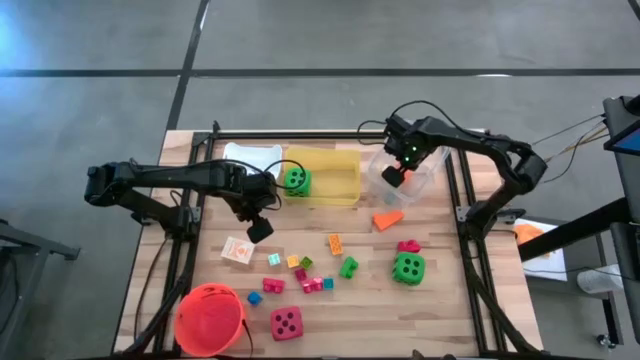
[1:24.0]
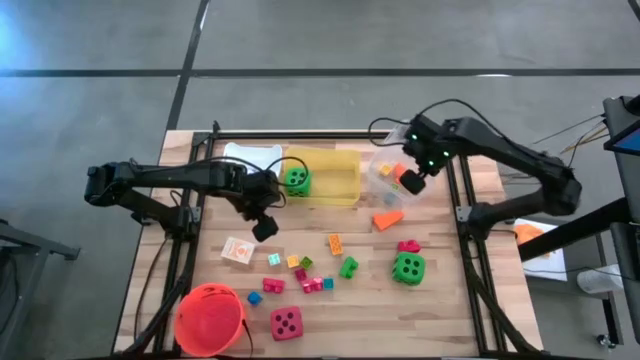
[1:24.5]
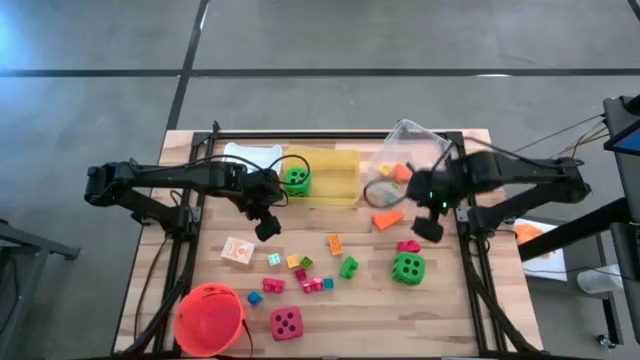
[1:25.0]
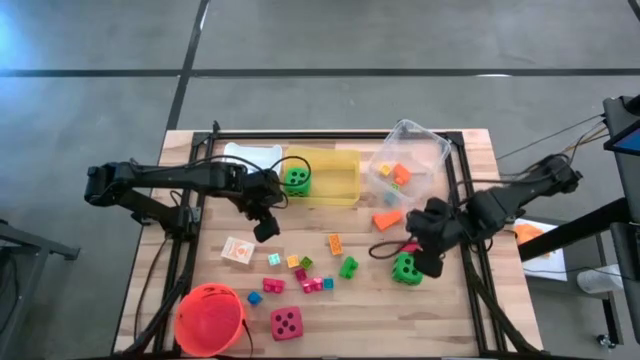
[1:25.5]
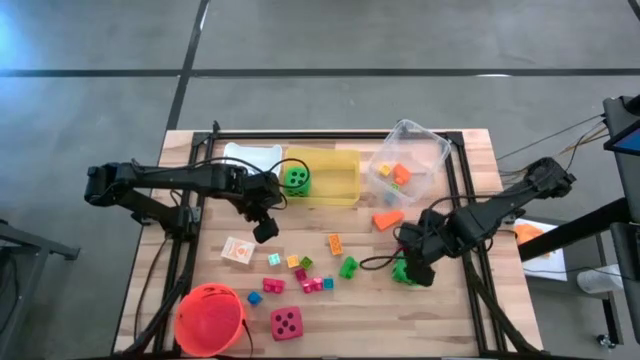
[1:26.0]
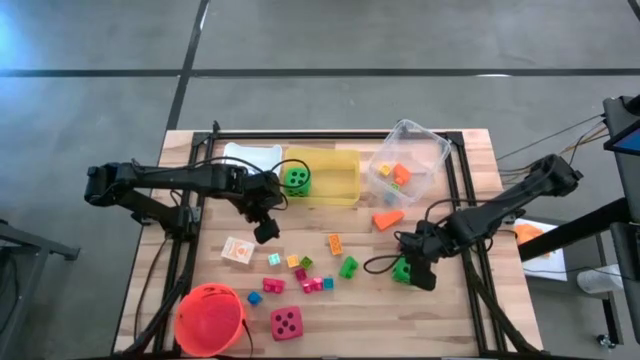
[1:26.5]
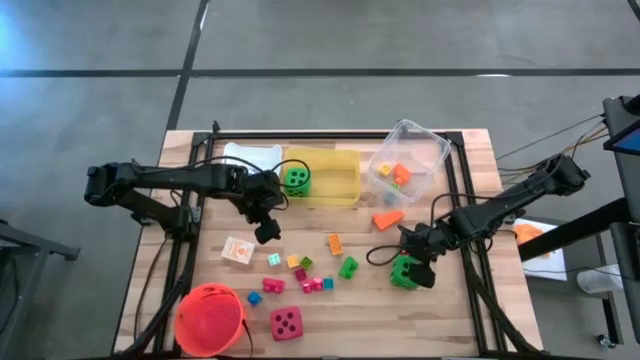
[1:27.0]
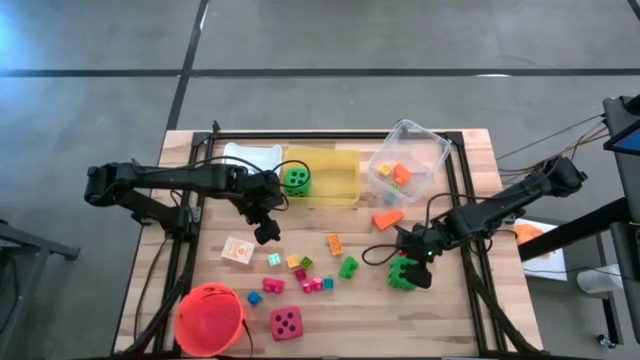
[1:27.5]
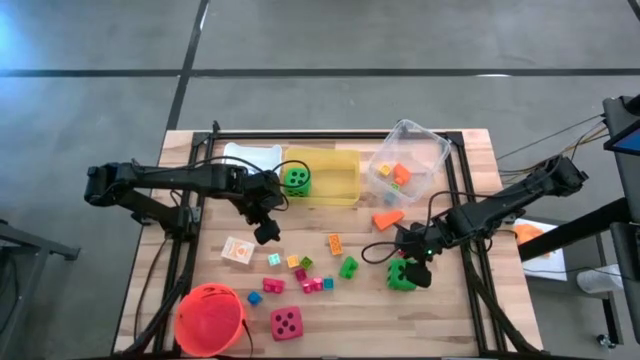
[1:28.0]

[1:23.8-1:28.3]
Task: Pick & Place Toys
Put the green dice into the yellow bin

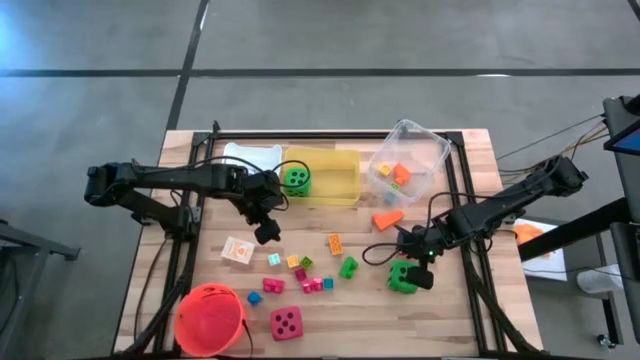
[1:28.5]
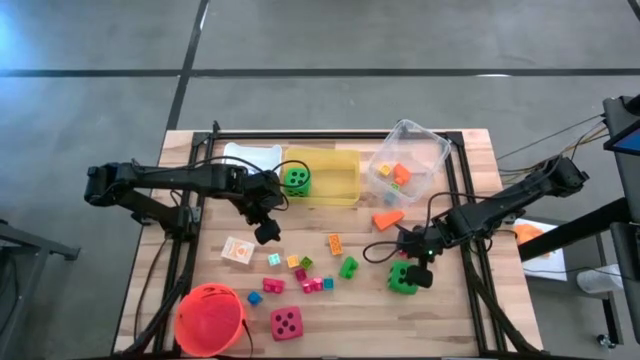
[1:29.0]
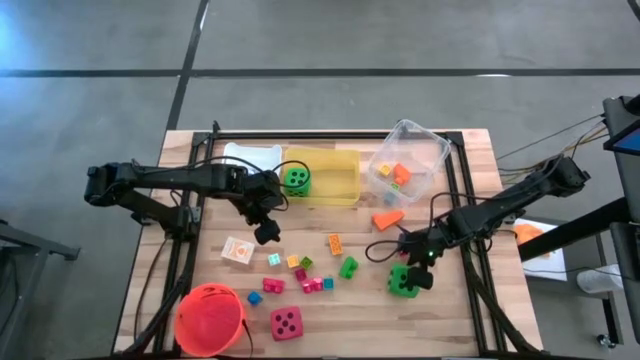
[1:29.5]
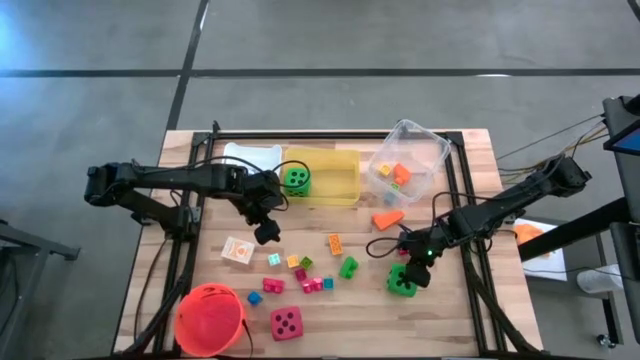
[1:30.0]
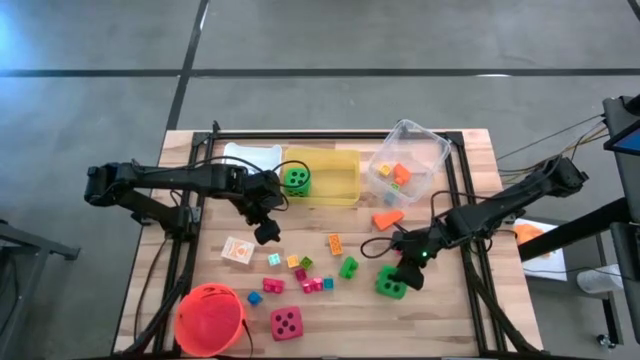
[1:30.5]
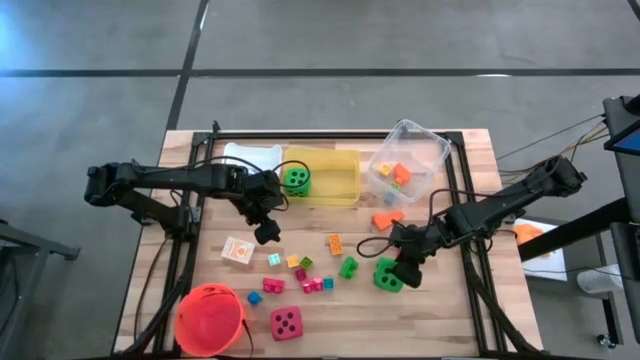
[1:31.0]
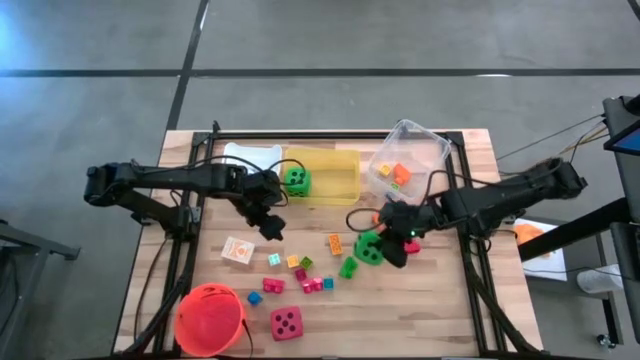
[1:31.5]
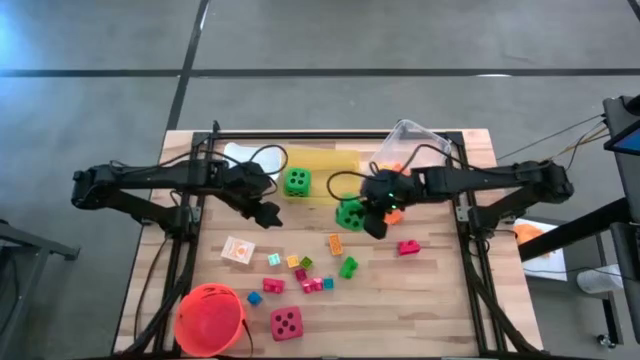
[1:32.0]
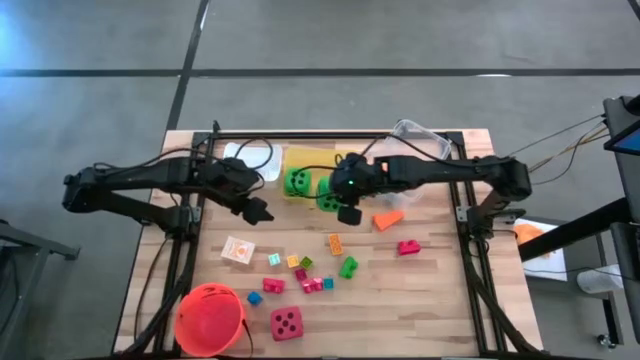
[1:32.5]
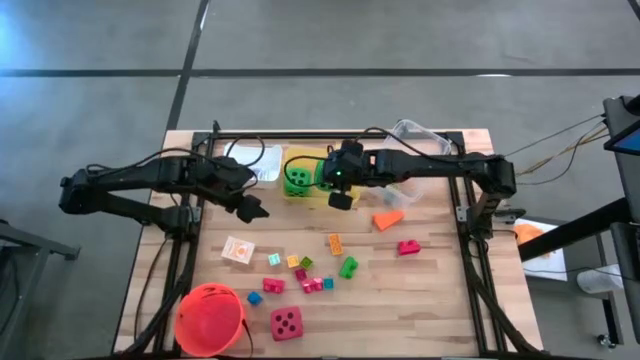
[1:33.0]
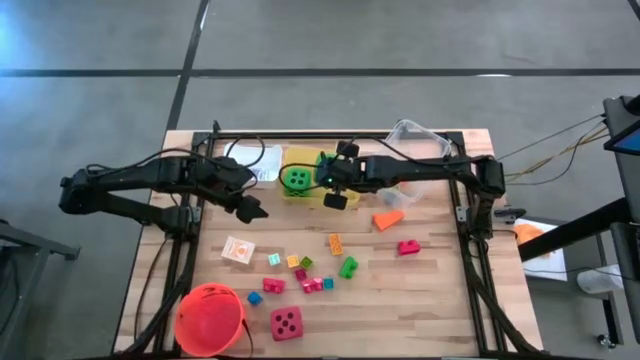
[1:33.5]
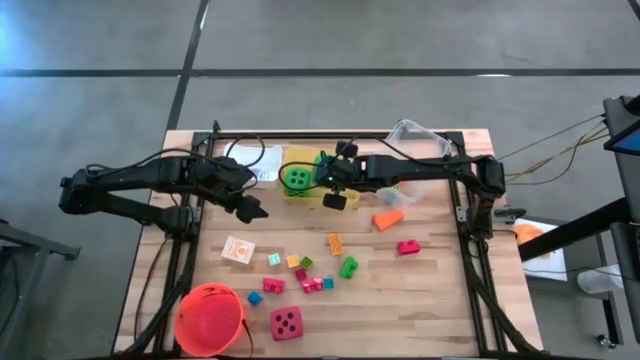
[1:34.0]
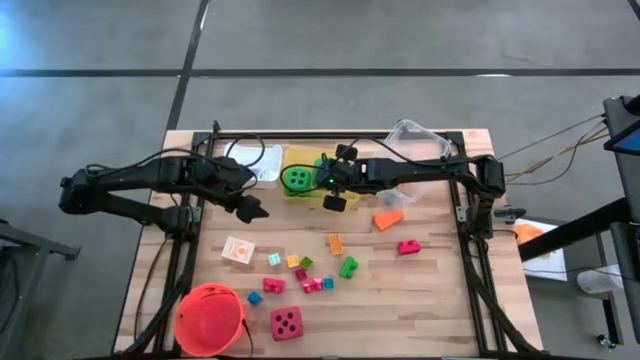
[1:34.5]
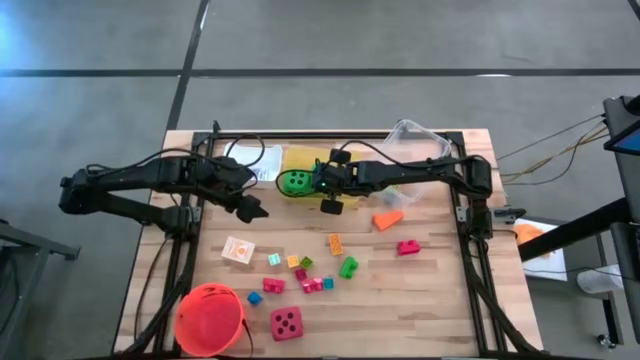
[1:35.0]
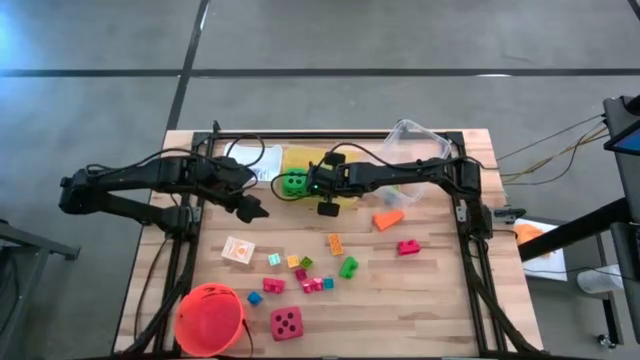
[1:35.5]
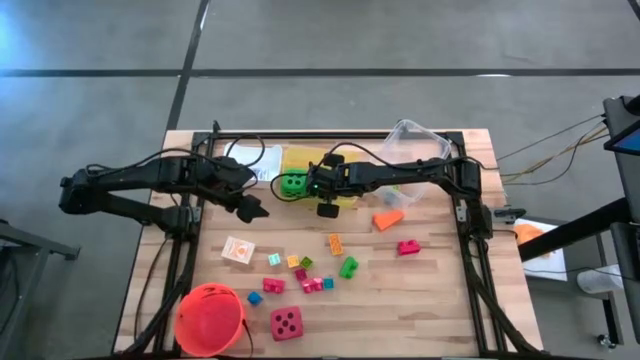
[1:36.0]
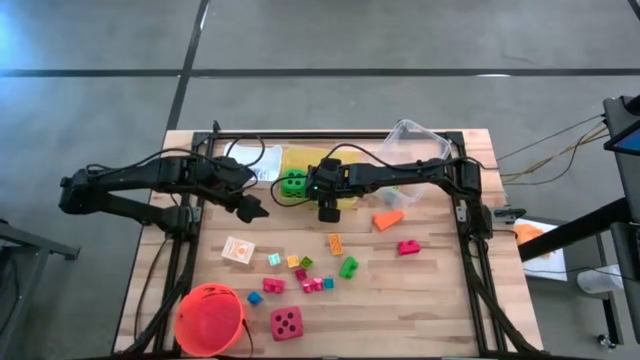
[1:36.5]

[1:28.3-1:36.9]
Put the green dice into the yellow bin

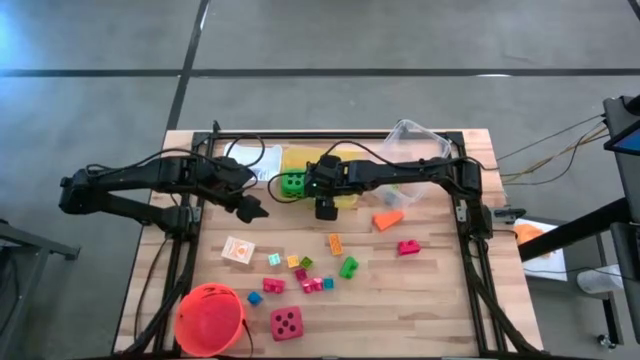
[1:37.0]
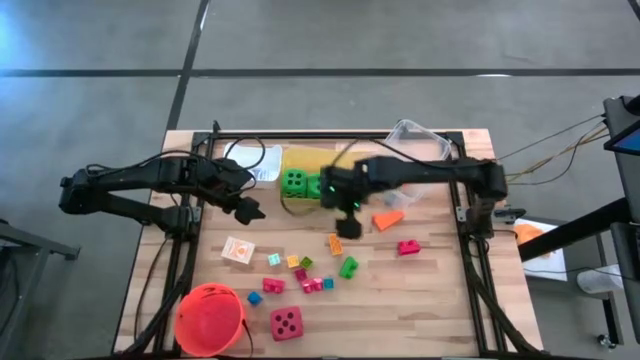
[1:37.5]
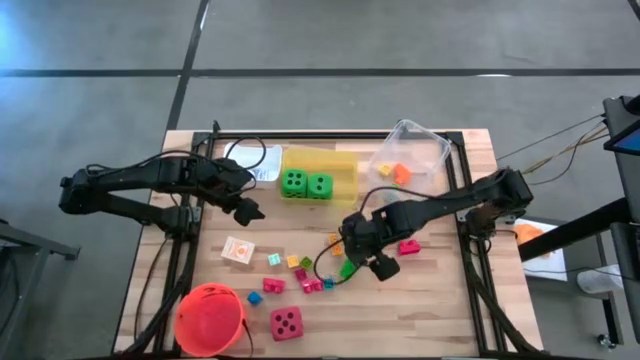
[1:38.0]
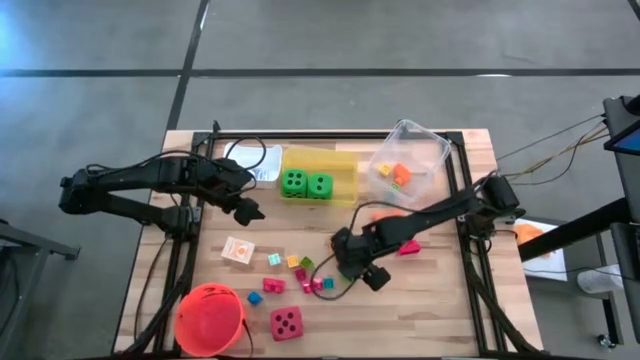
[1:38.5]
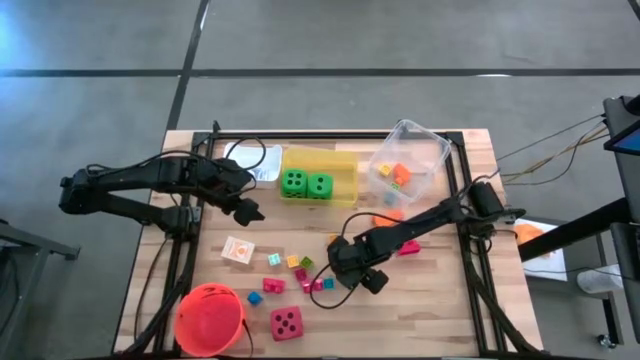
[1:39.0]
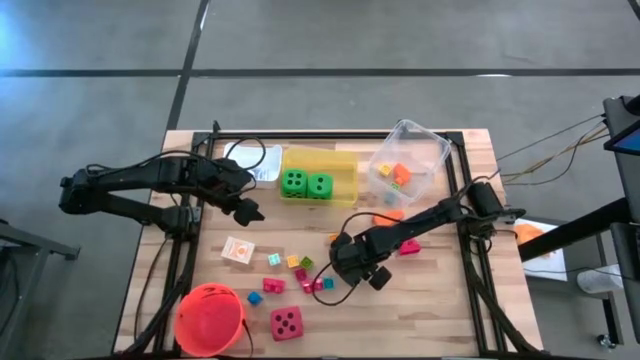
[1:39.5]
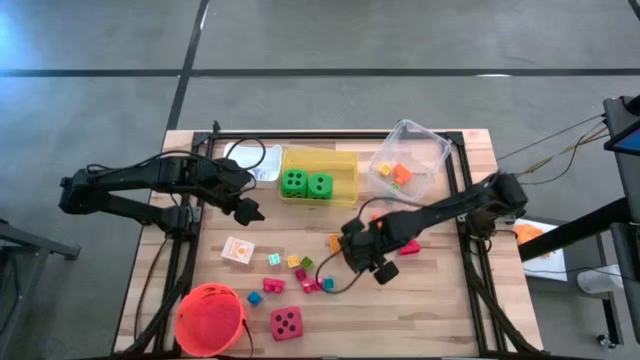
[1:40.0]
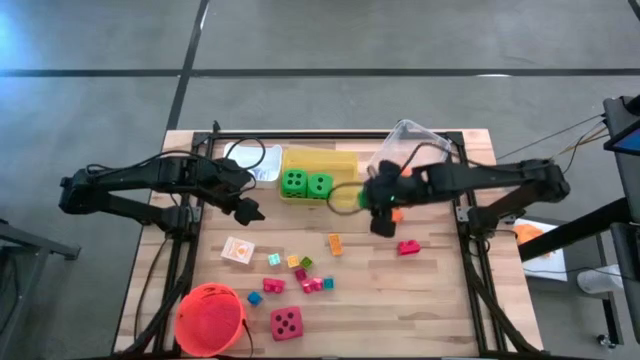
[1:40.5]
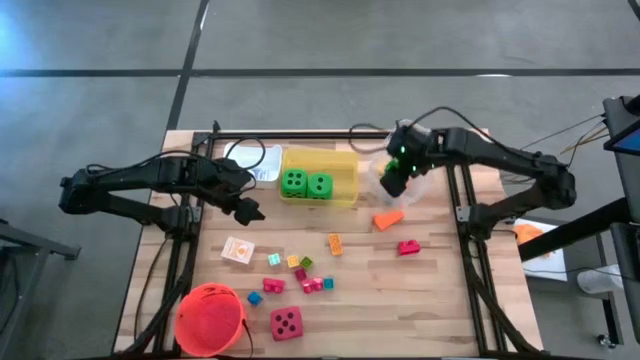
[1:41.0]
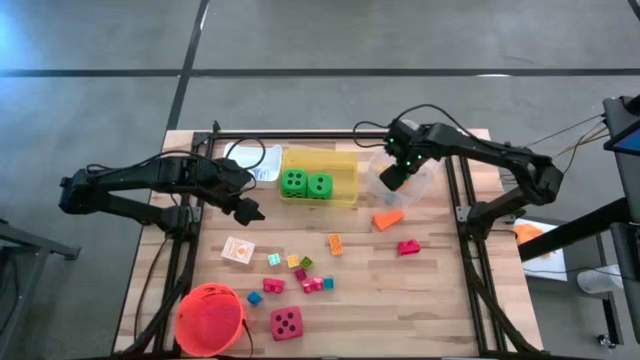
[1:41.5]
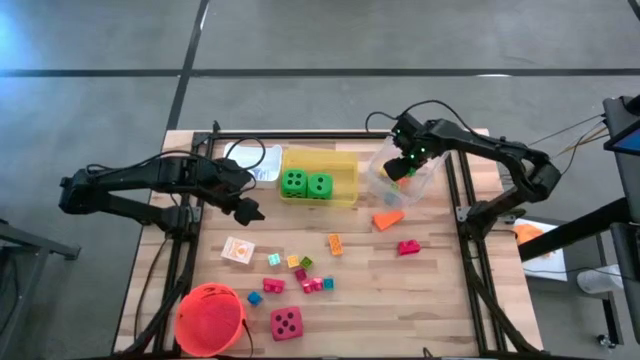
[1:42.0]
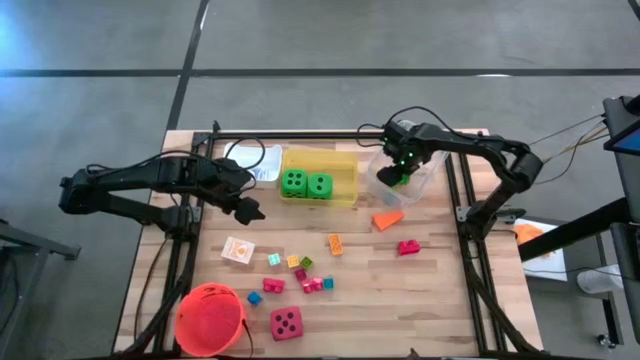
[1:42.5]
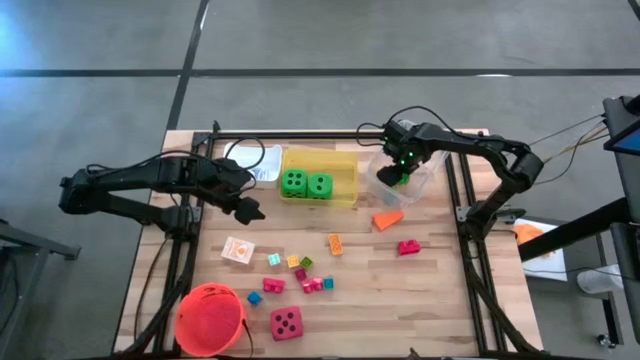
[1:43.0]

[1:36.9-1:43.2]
Put the green game piece into the transparent bin

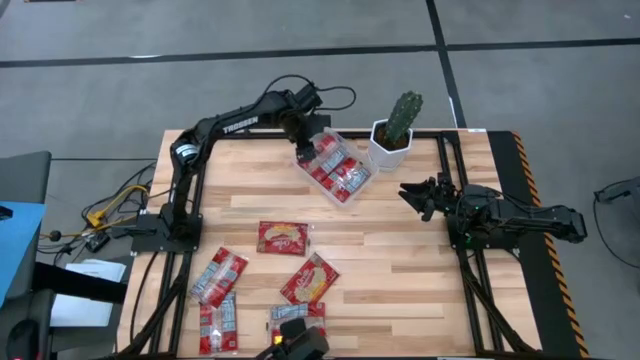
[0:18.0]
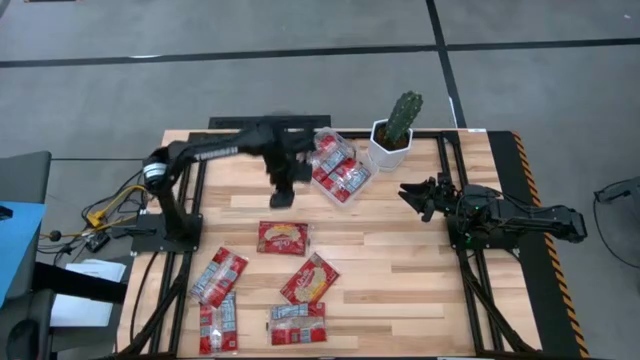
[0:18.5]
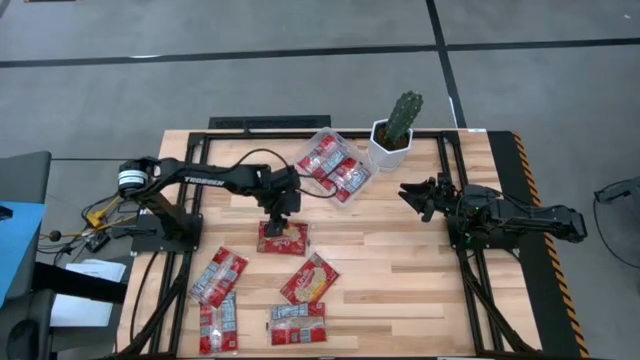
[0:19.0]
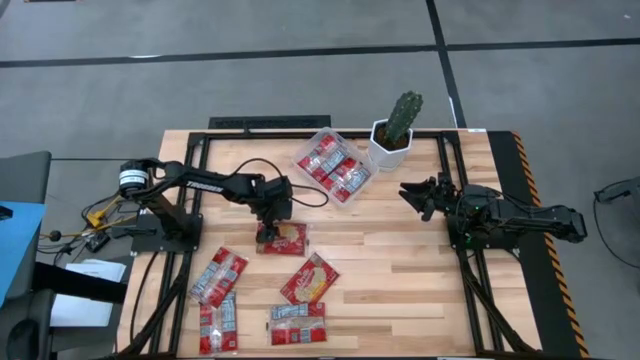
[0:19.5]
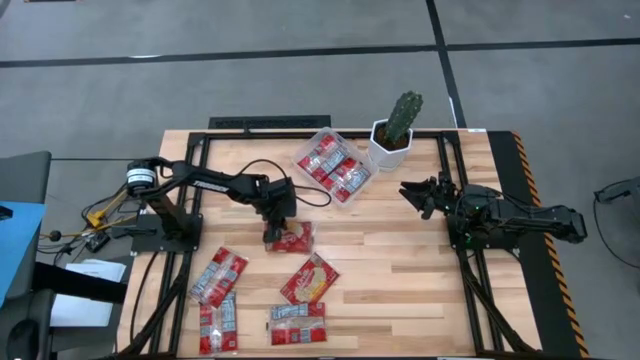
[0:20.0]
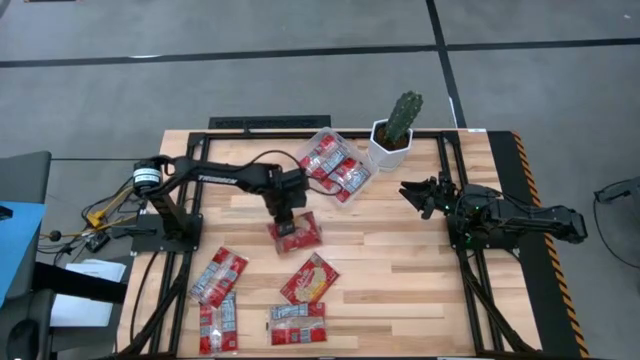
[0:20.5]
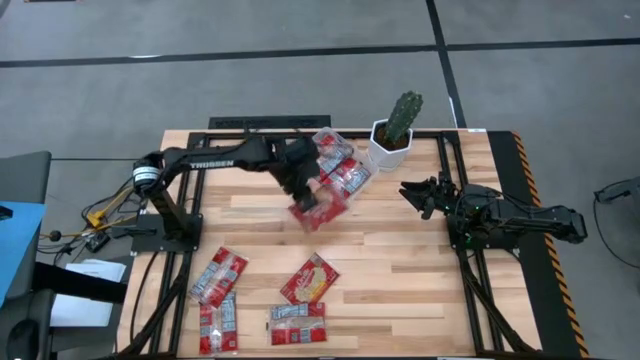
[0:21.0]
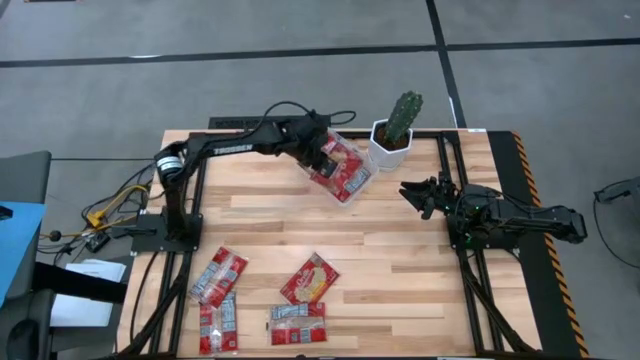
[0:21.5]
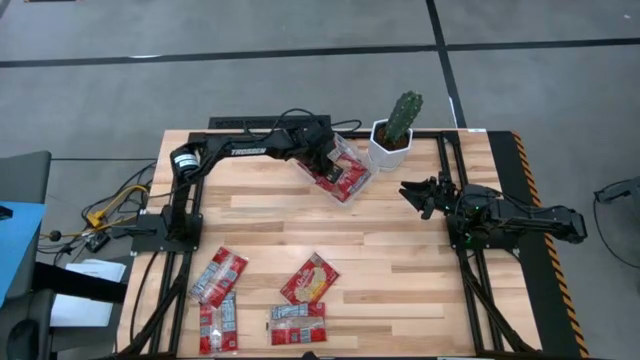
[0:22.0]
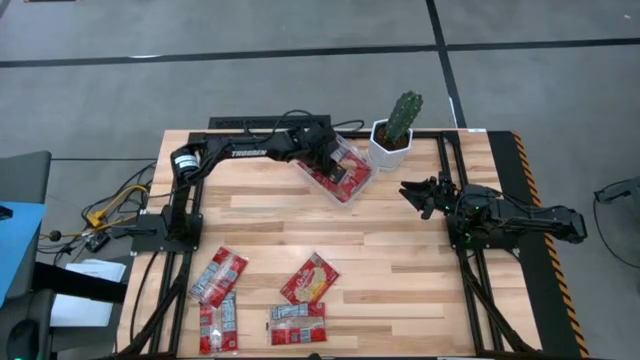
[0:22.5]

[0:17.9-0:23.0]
Task: Sort popcorn bags into baskets
Put the red popcorn bag into the transparent bin
